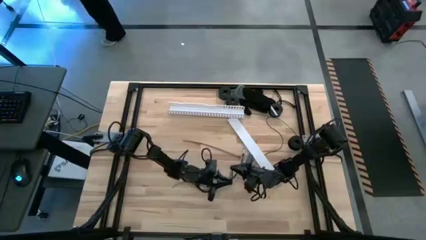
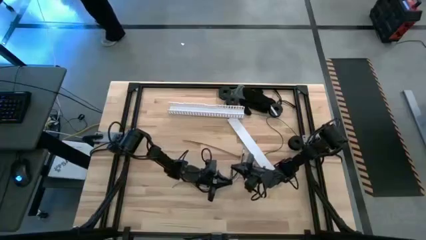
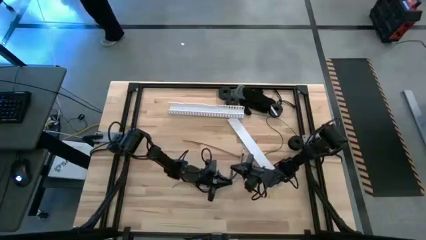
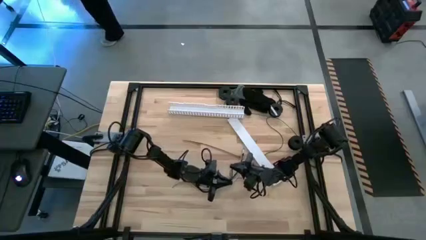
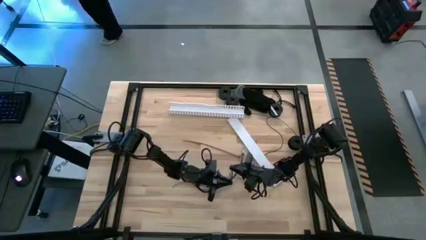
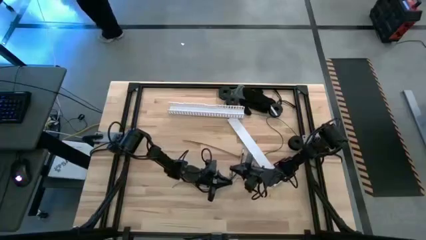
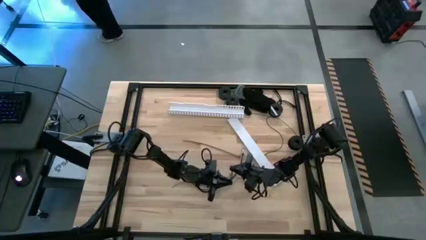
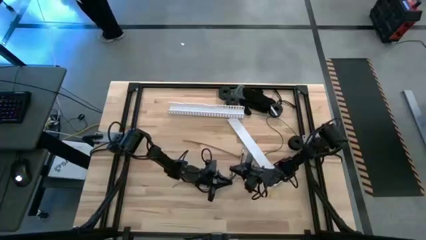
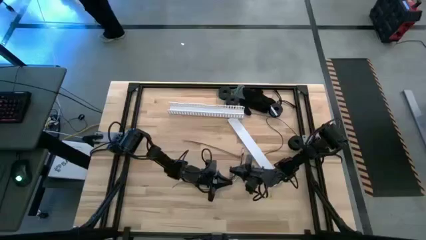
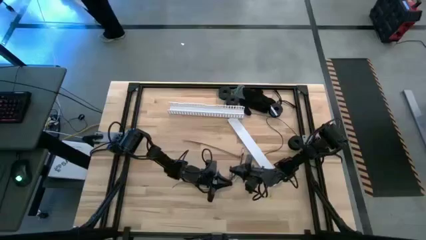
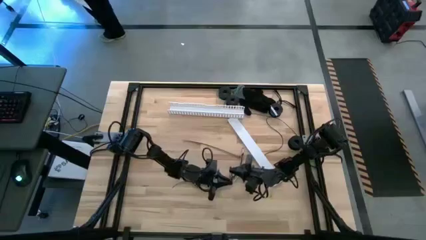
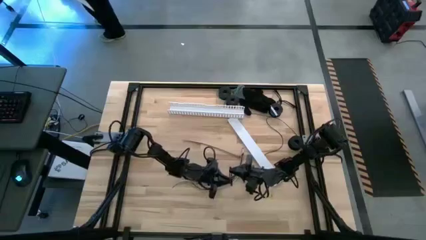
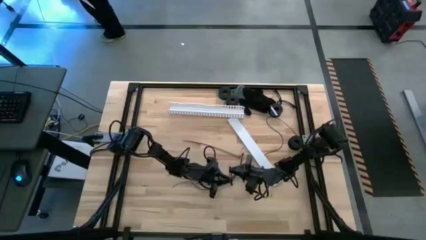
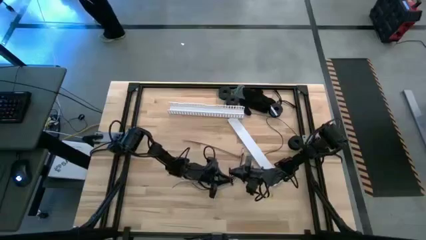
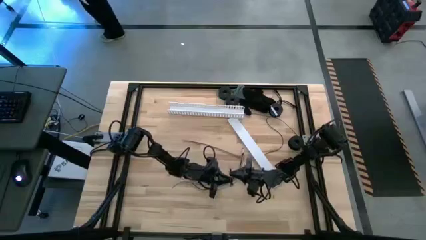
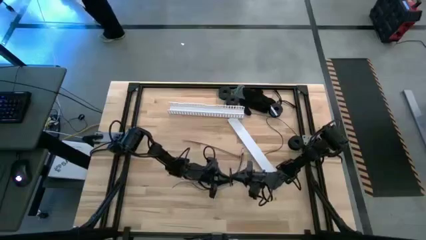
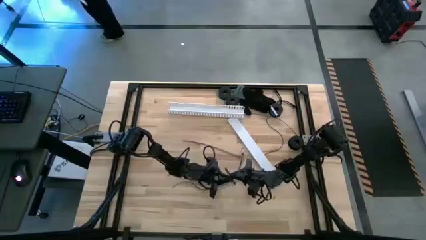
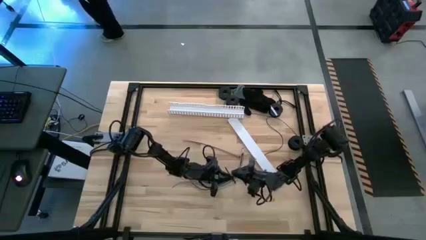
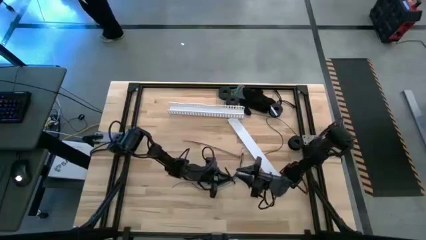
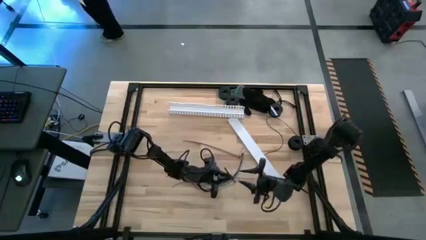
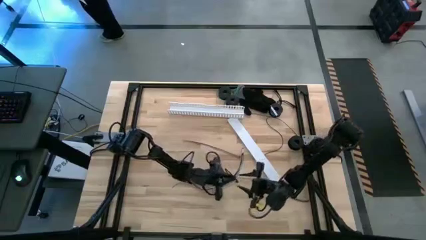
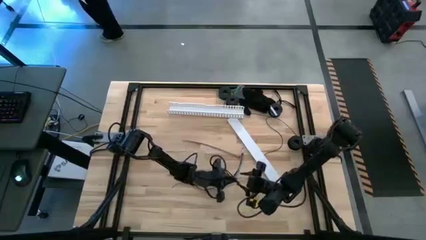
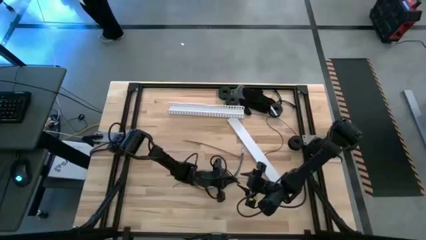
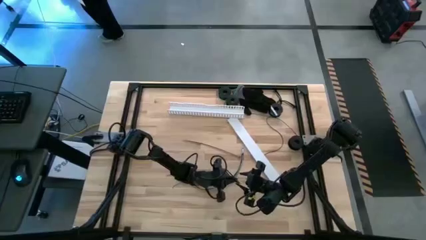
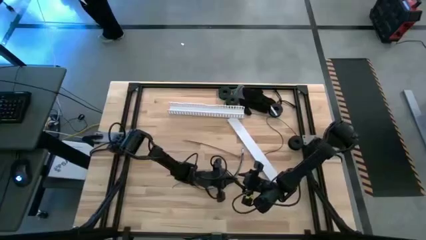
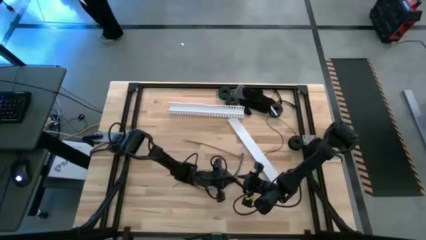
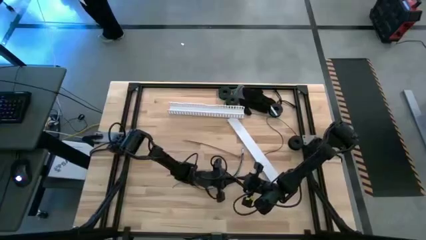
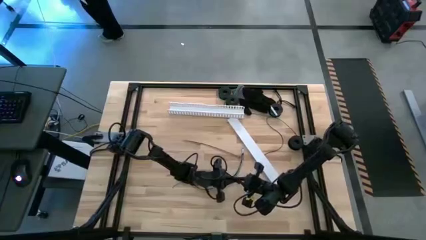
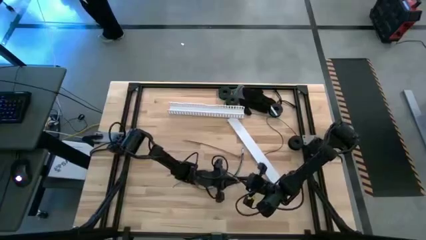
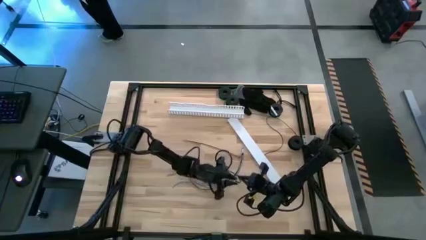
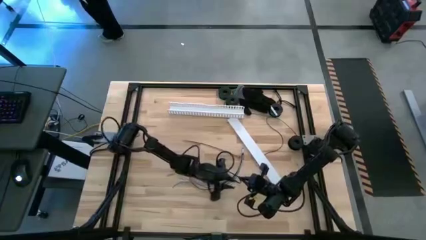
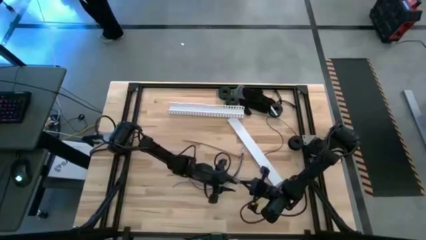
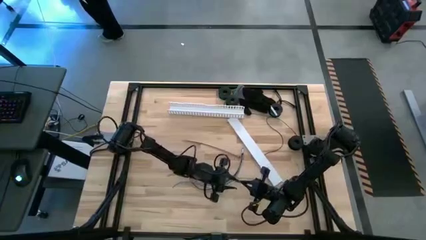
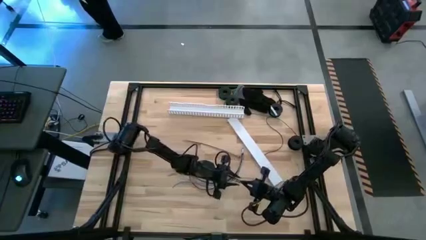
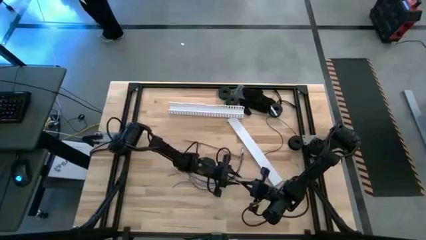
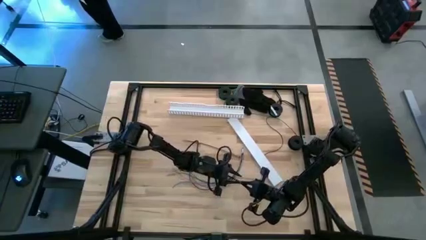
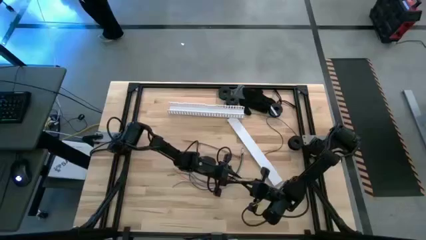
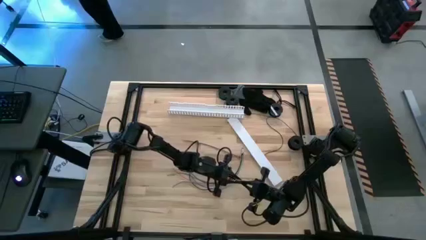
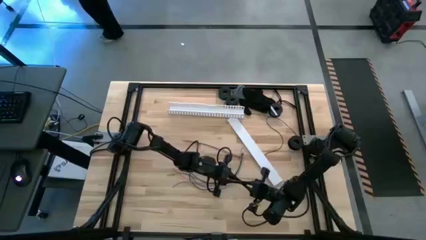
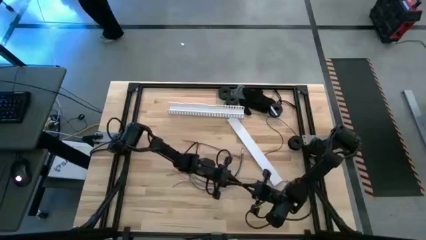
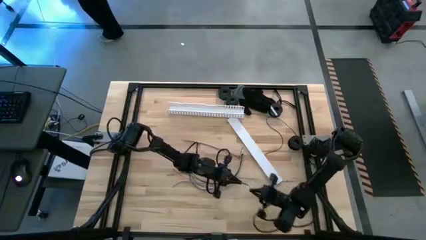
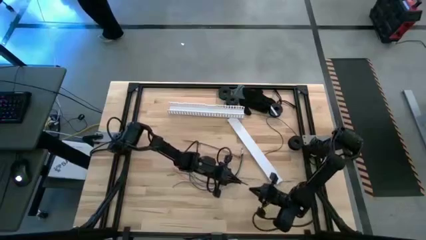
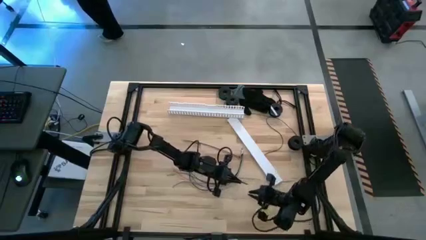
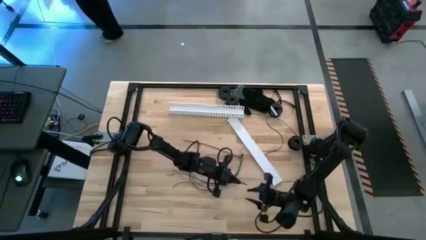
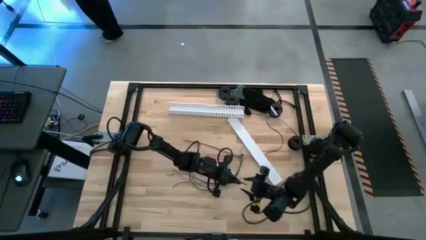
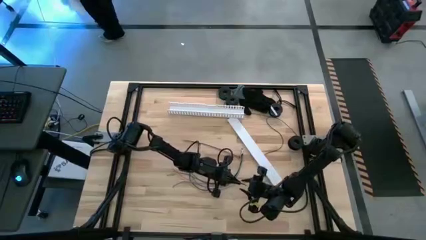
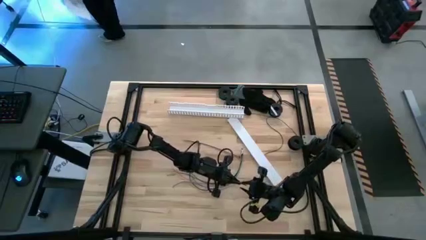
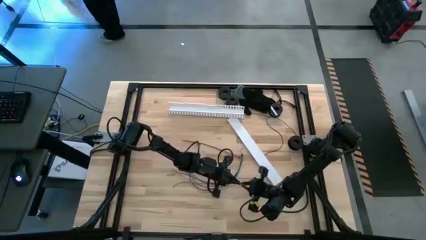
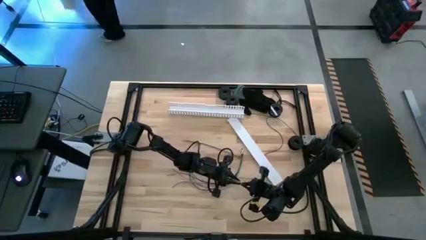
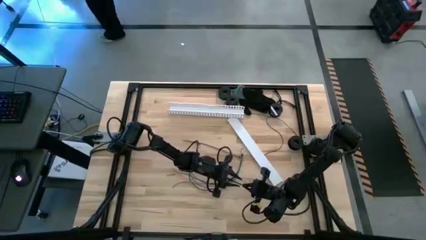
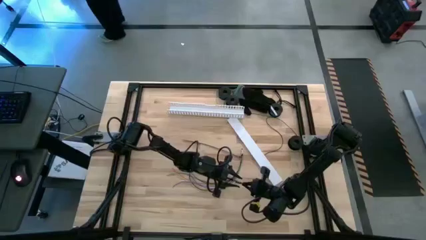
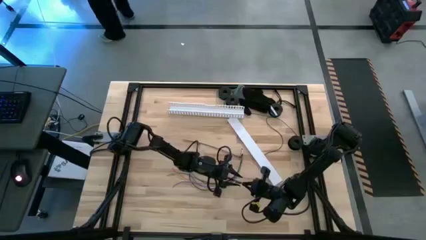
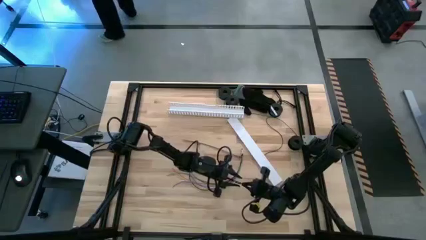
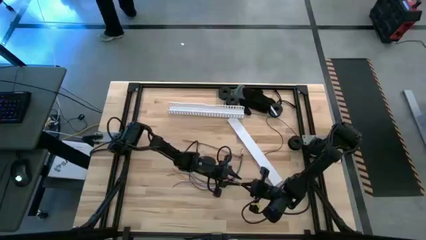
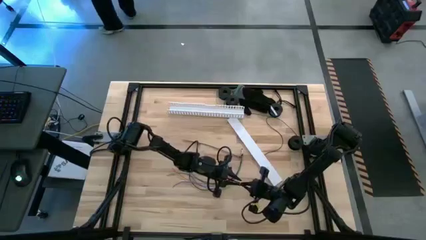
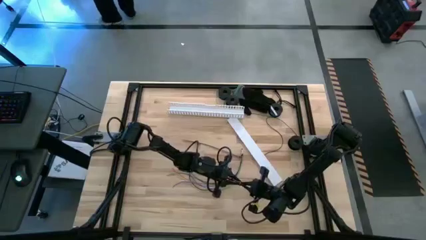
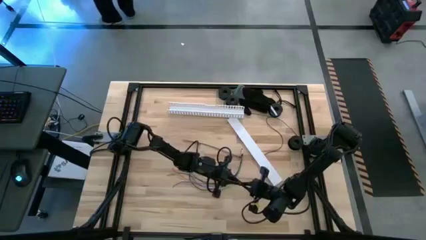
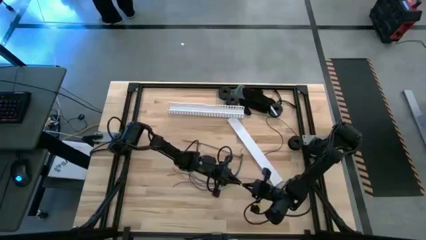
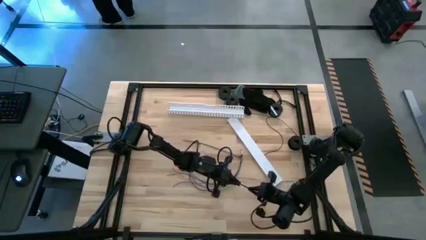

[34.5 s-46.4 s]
Task: Ziptie cables
Wrap the wire cables with the black zip tie

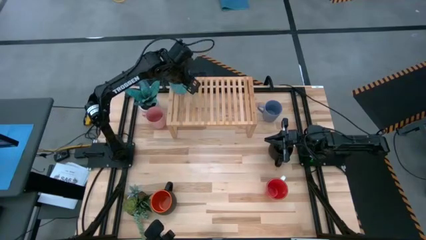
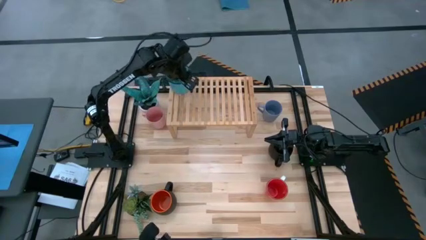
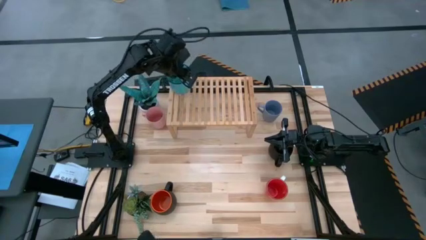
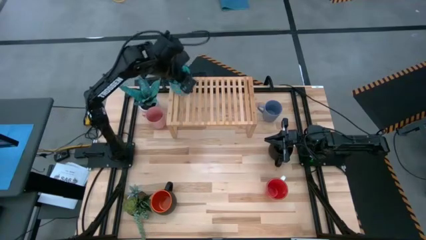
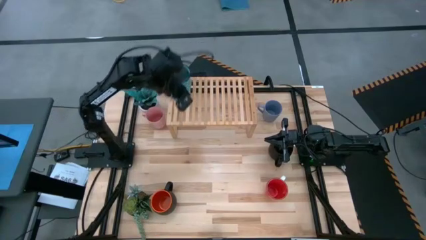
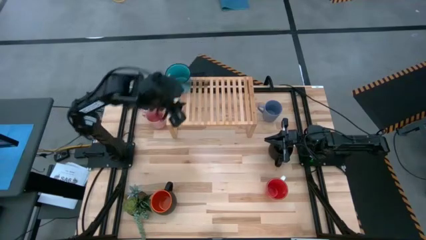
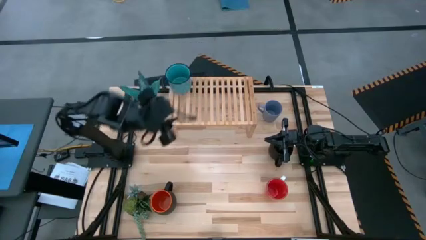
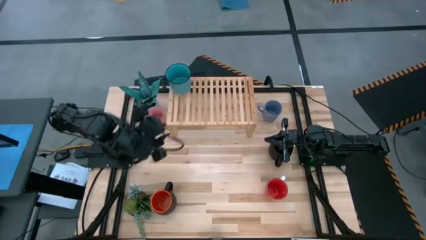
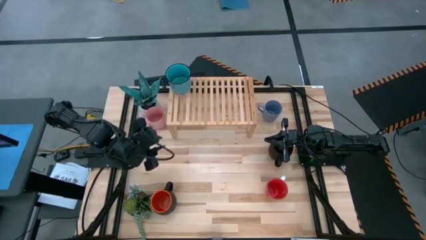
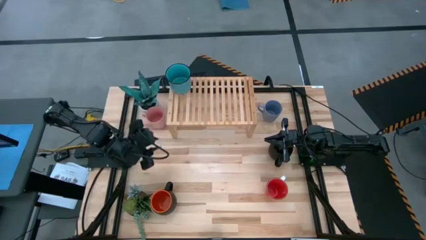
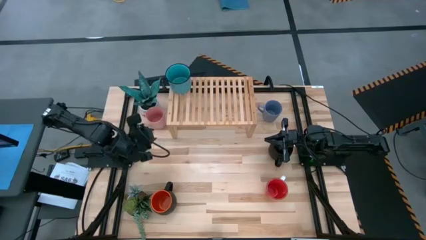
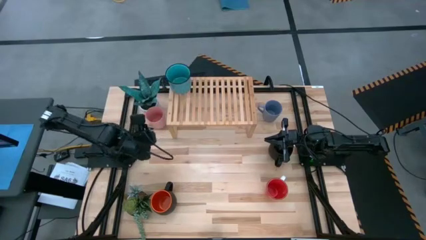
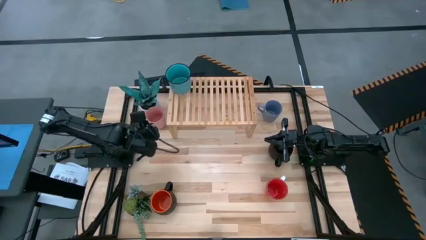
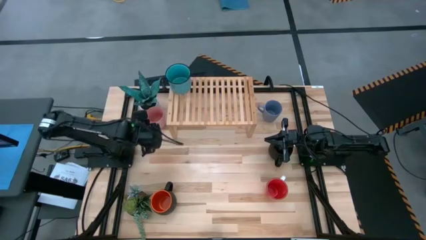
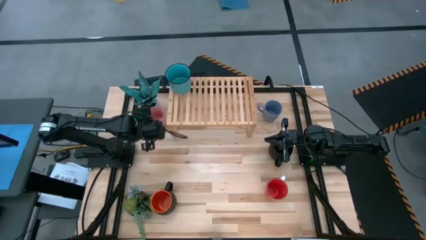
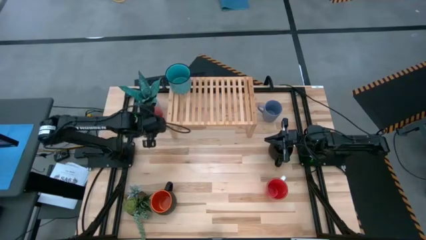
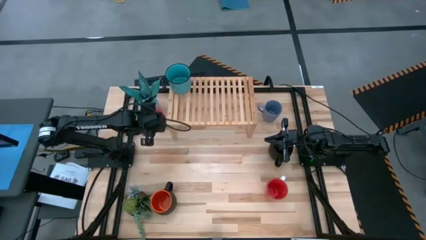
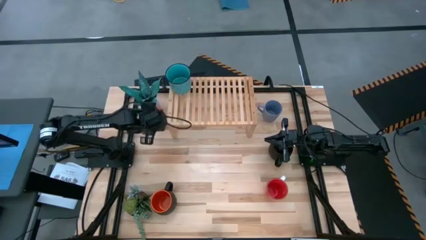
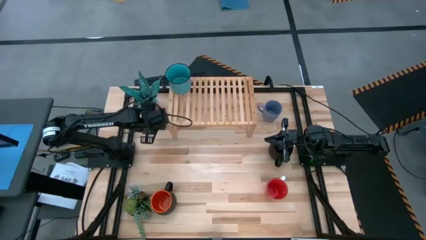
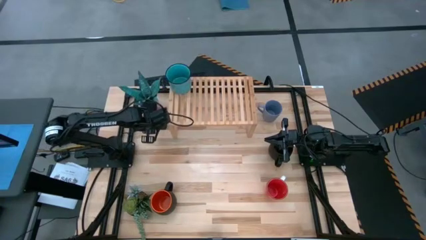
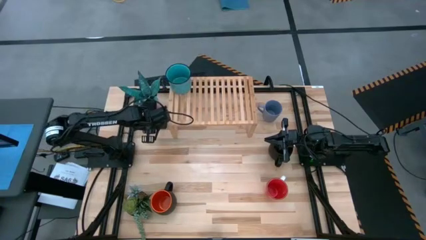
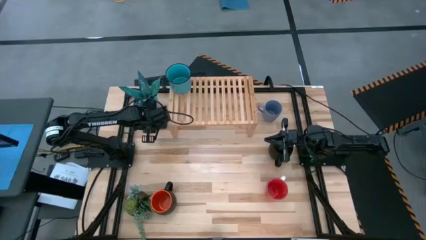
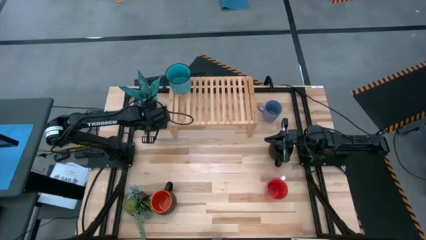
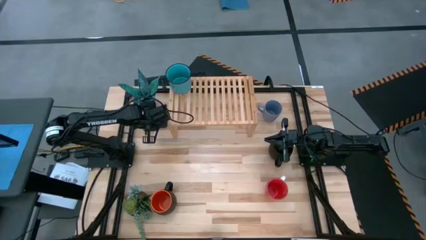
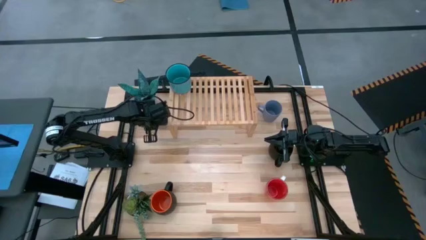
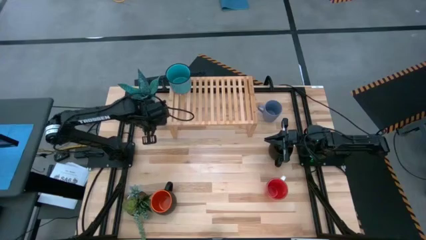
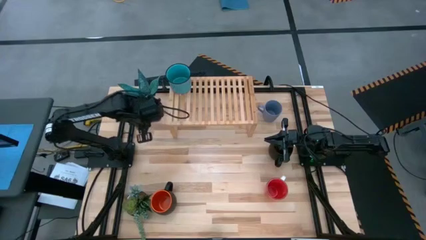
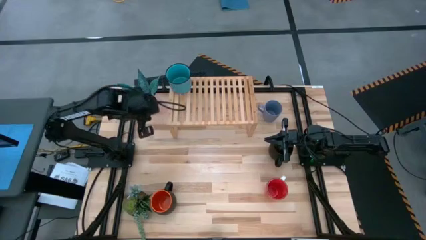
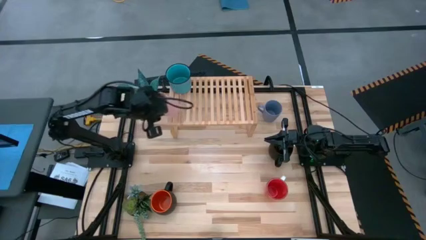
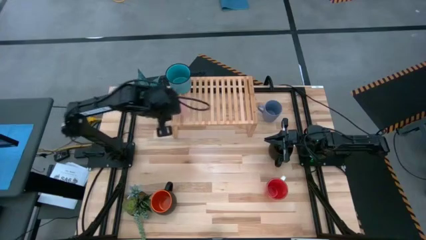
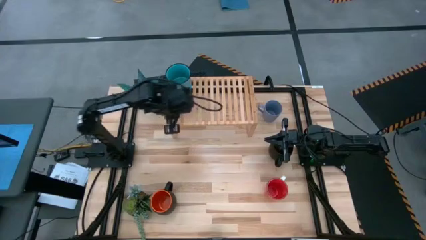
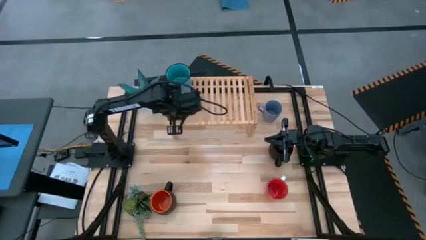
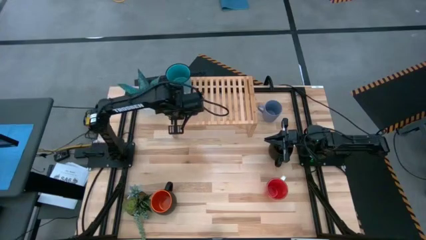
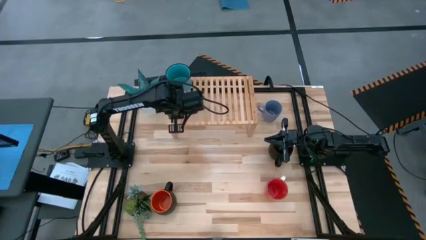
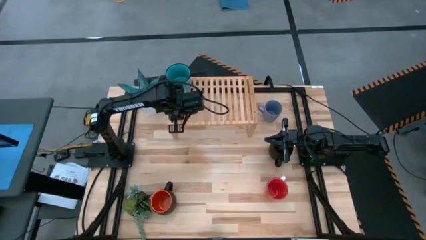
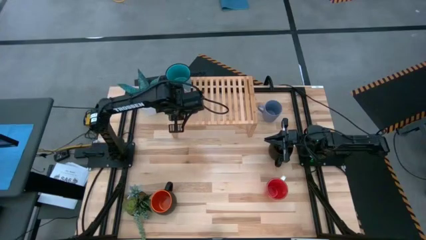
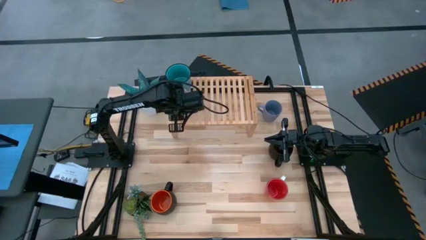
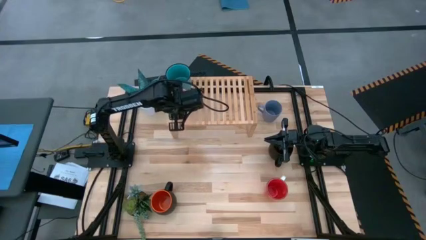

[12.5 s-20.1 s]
Task: Place coffee mugs
Put the pink mug onto the shelf
